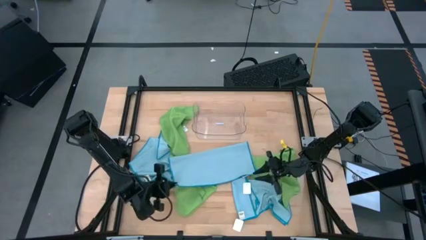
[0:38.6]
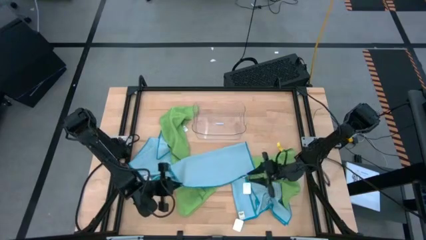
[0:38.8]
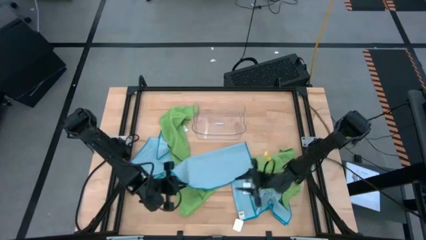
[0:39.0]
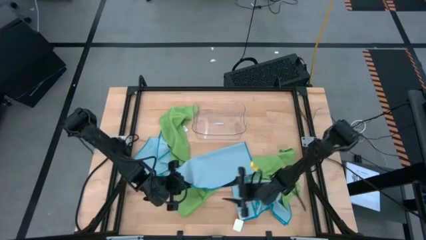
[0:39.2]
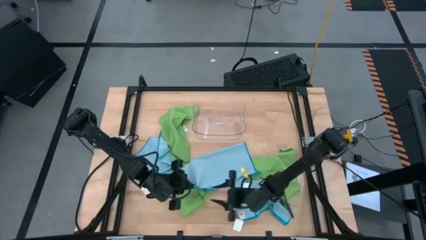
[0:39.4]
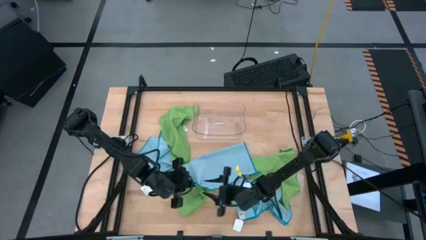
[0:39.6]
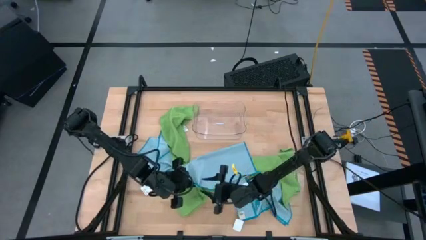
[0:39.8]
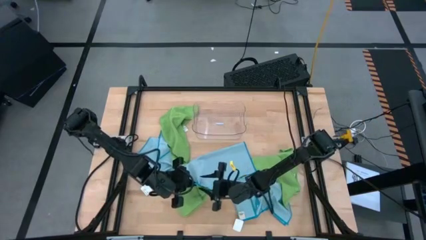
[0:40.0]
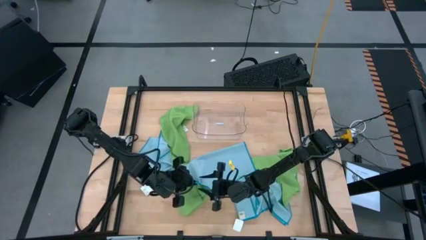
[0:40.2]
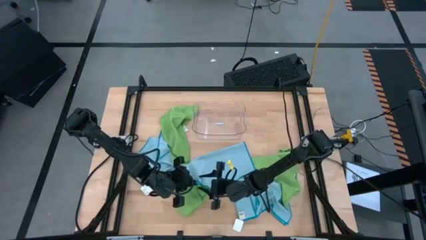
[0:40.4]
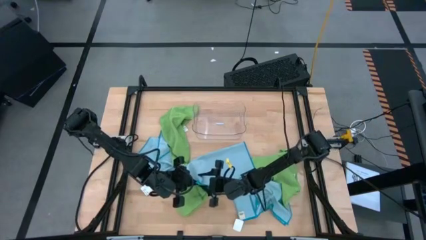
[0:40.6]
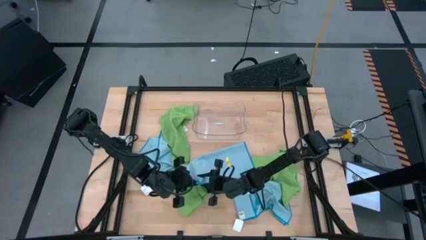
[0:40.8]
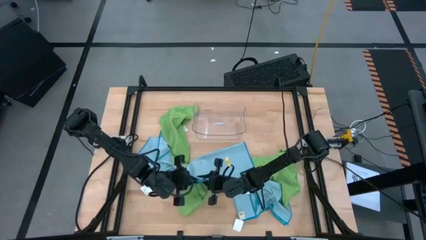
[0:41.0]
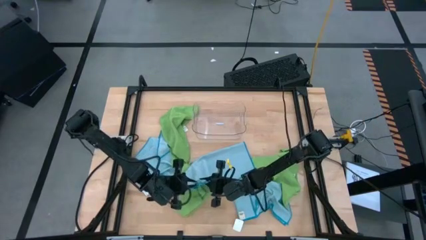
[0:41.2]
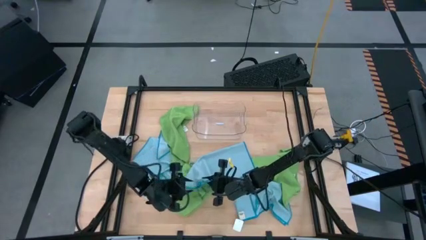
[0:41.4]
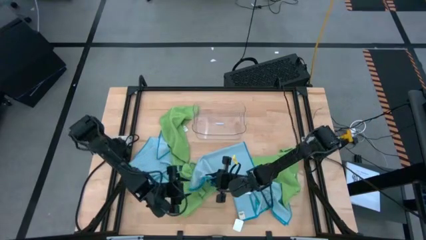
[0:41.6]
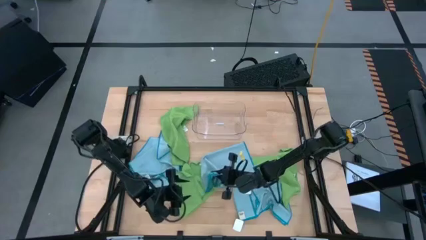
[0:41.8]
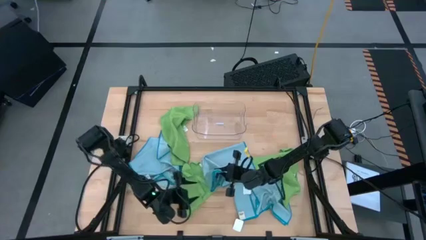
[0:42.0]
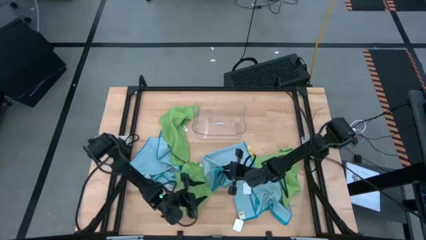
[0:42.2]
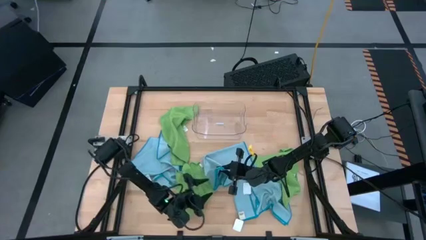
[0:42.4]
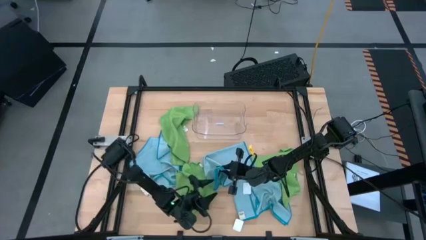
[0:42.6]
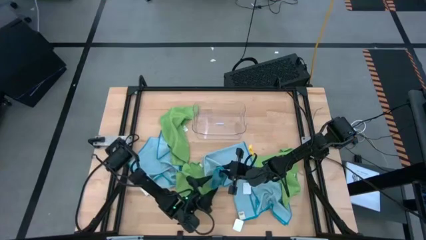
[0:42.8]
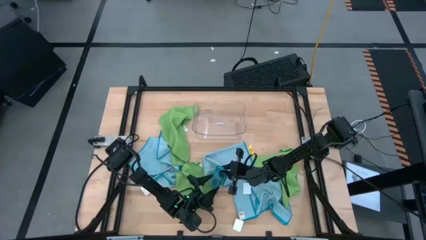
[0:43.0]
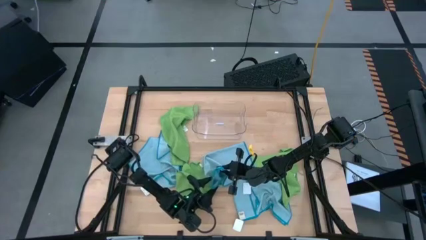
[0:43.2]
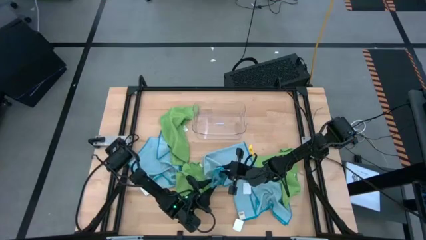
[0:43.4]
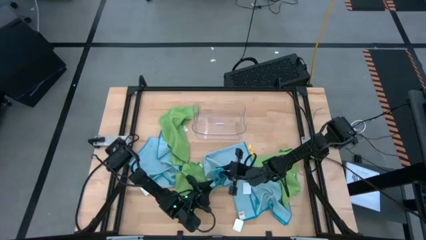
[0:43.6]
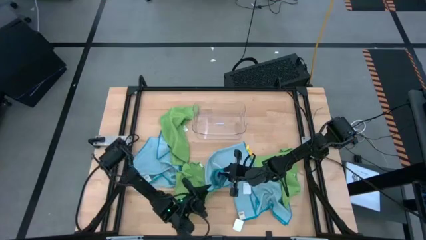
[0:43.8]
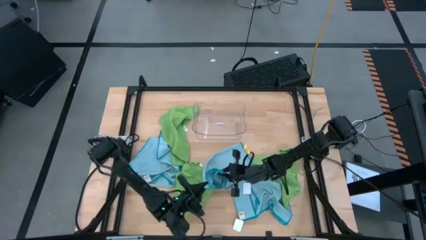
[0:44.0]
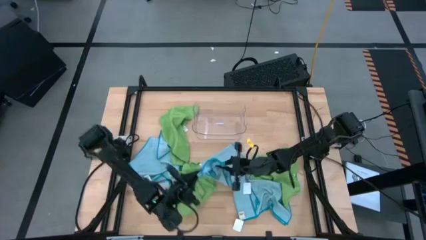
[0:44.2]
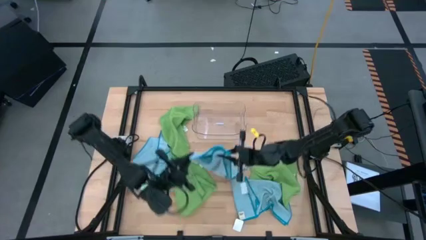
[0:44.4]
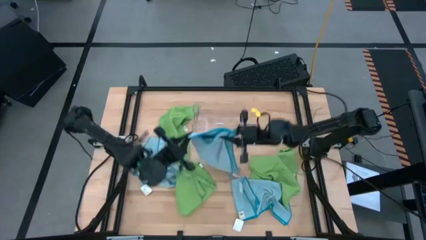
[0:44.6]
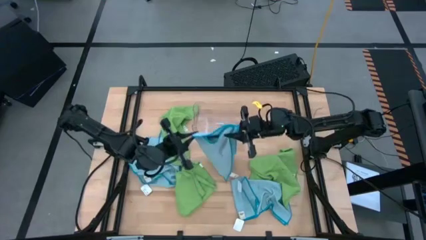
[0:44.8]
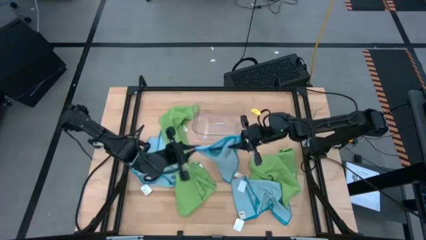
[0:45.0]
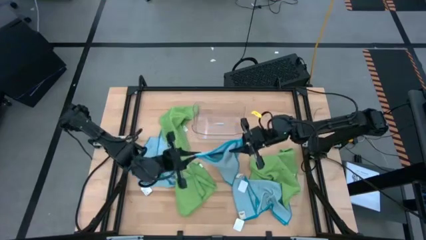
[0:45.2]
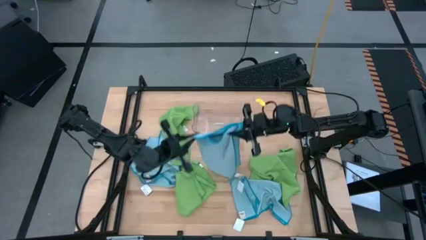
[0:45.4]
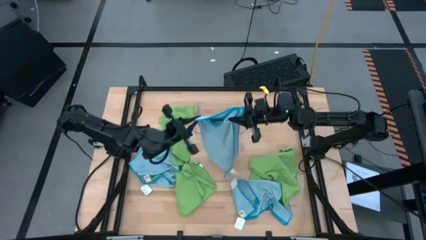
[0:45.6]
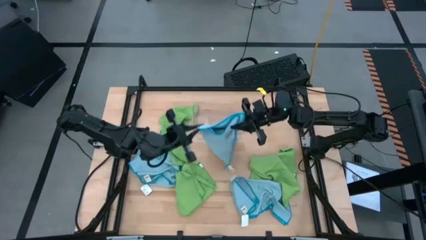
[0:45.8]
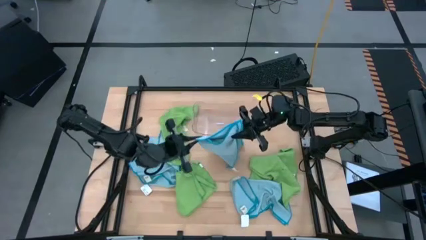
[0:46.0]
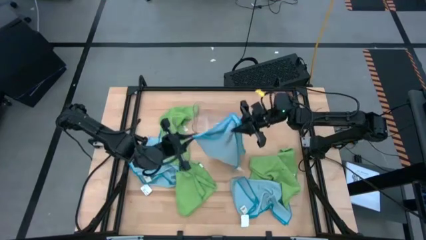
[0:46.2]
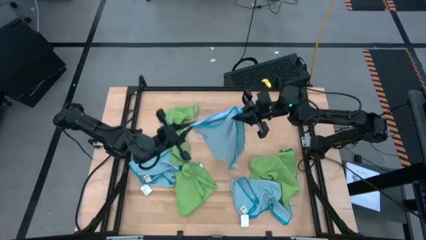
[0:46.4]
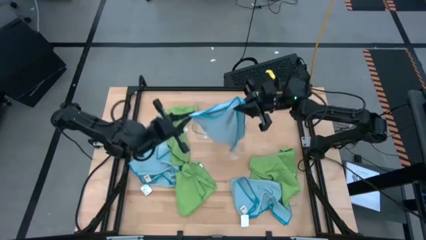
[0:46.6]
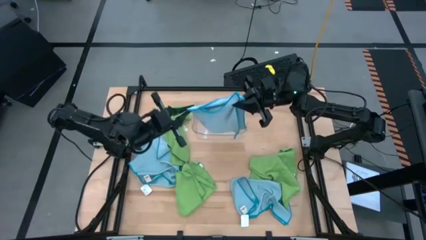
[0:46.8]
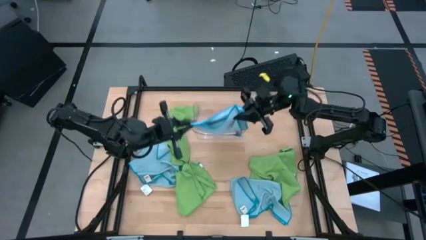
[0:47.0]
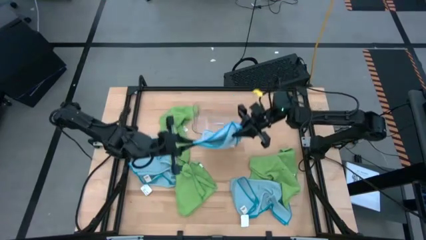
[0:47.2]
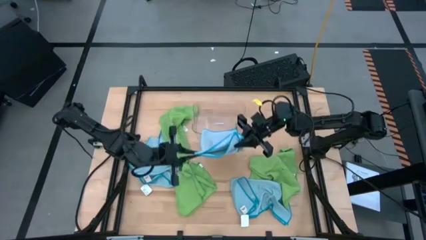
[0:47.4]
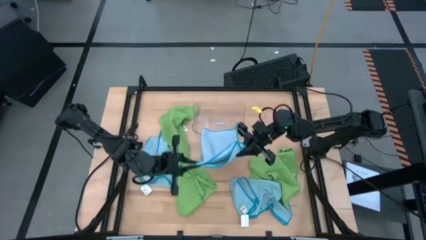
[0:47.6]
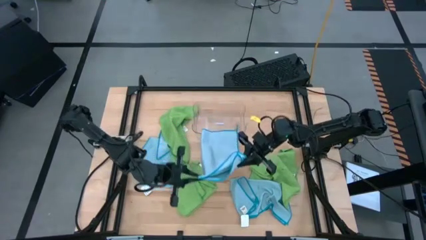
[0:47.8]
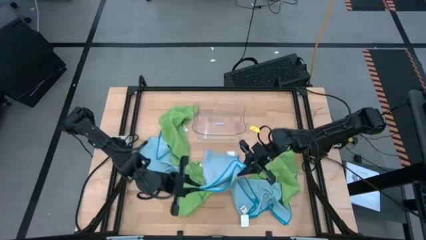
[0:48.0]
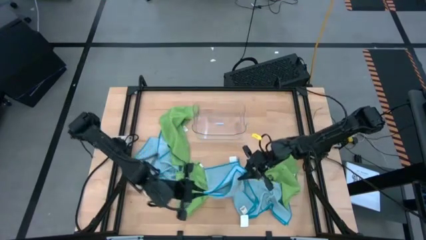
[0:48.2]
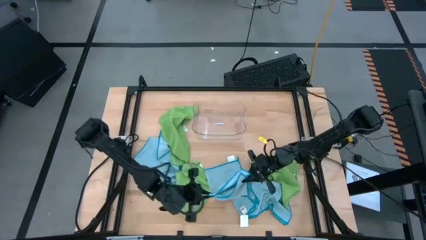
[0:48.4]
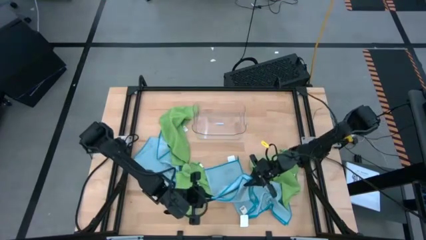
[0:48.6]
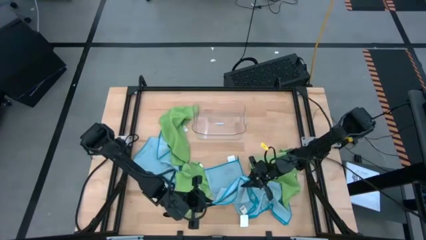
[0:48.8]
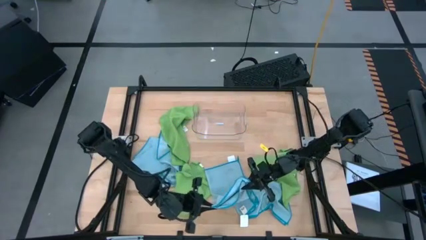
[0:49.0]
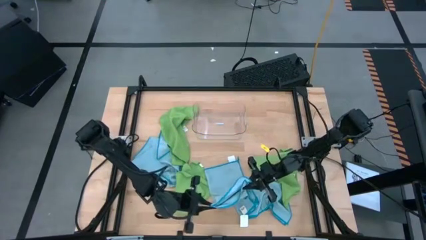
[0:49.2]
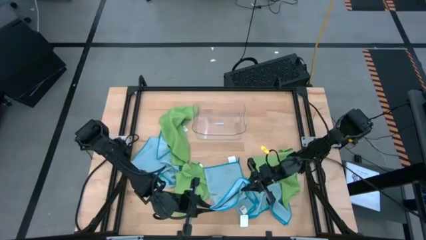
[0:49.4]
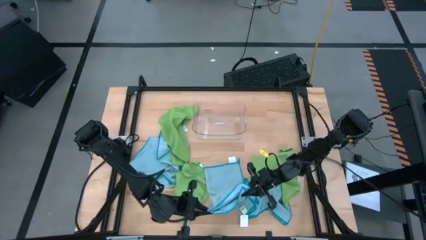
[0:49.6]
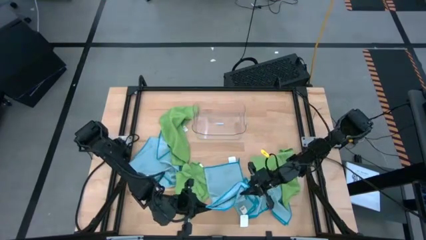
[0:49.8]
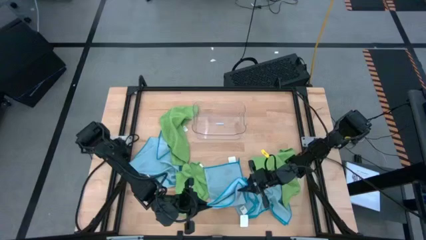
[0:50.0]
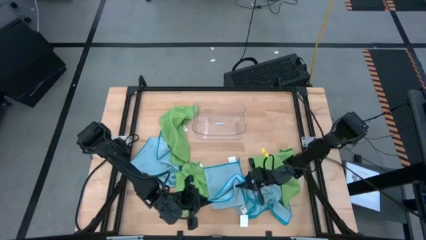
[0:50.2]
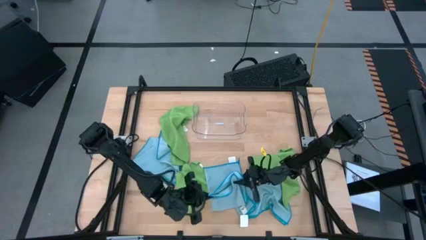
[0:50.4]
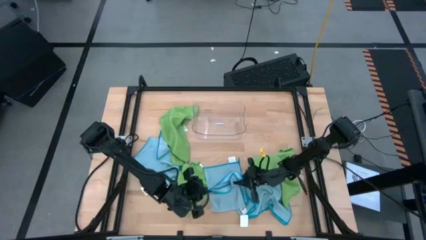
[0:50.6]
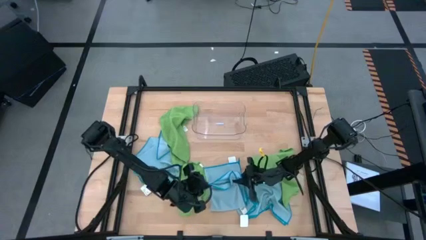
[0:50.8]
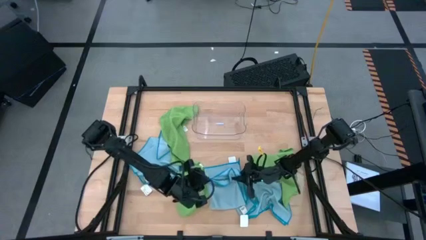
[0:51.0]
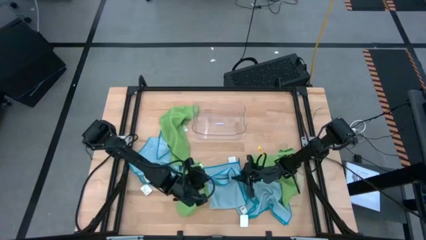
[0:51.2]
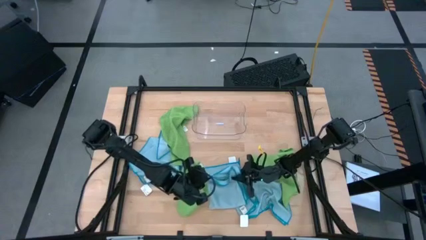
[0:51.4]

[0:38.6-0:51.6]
Task: Fold microfiber towels
Fold the top right blue microfiber cloth
